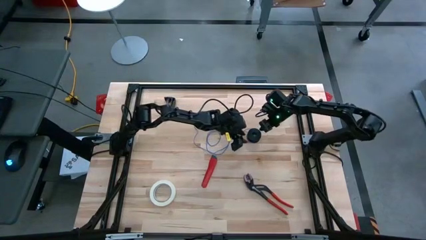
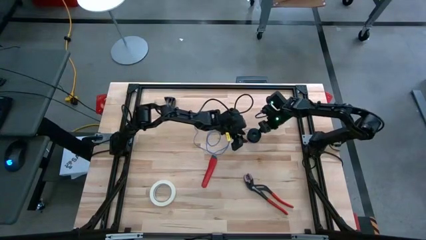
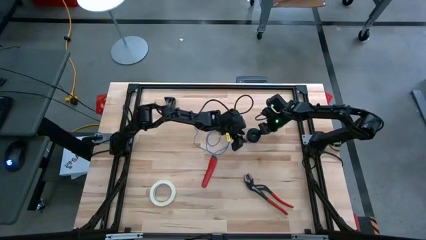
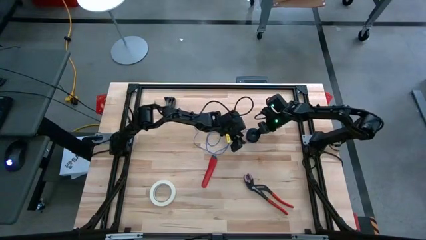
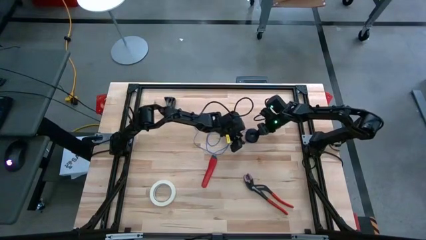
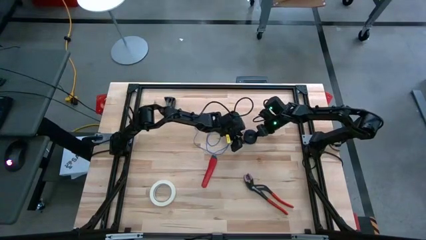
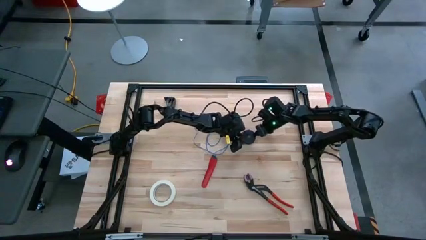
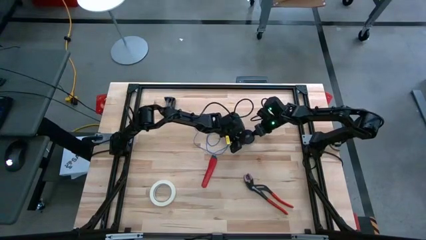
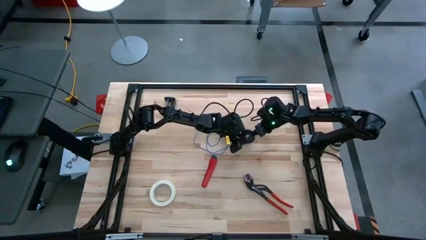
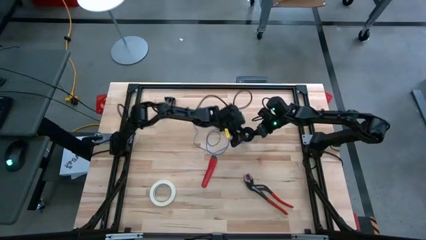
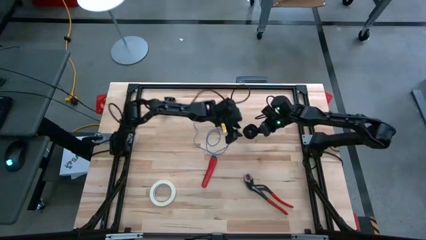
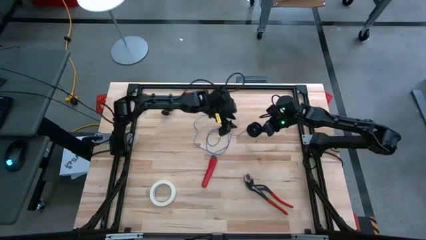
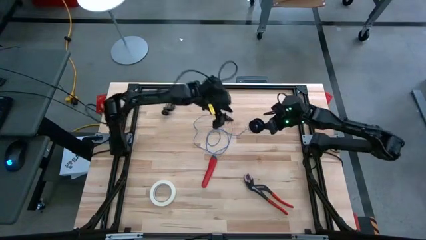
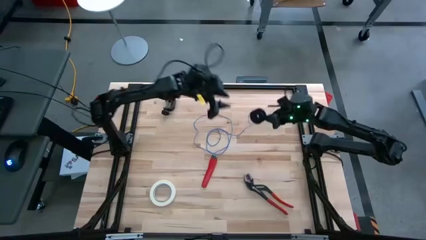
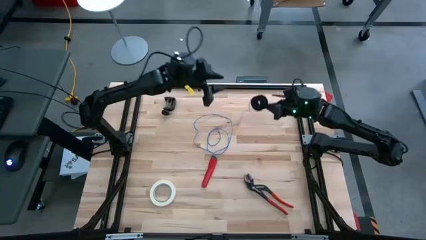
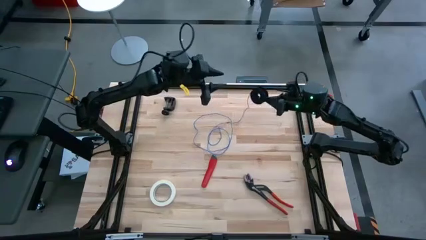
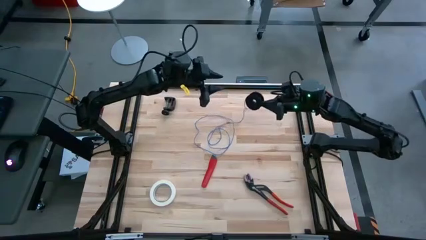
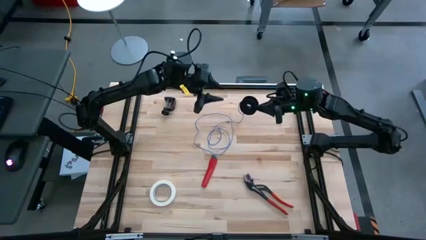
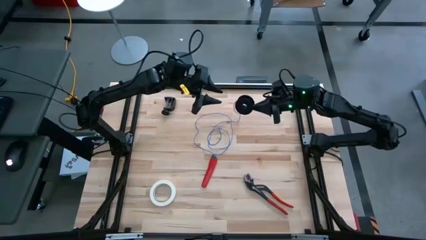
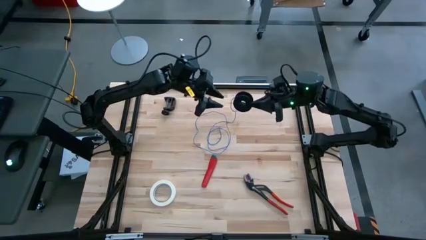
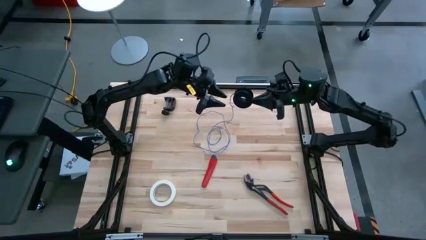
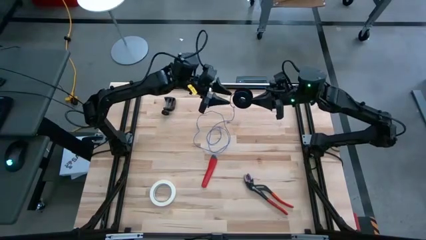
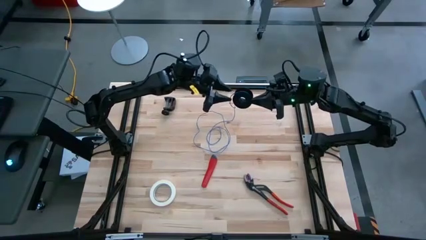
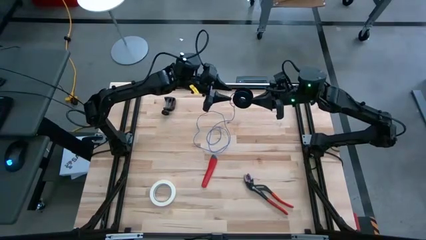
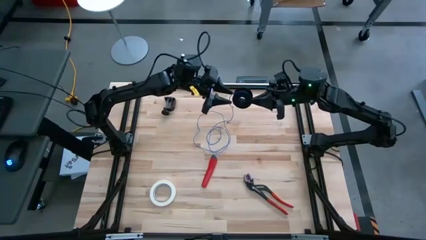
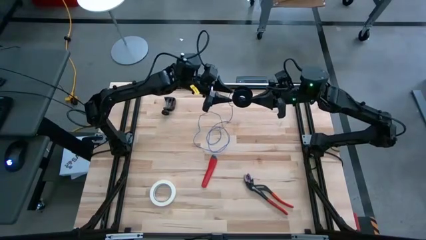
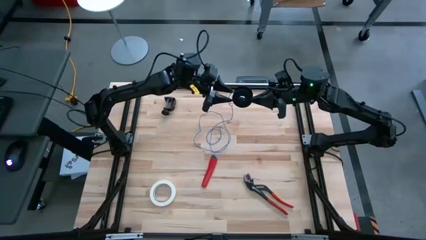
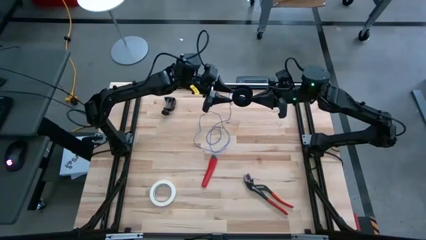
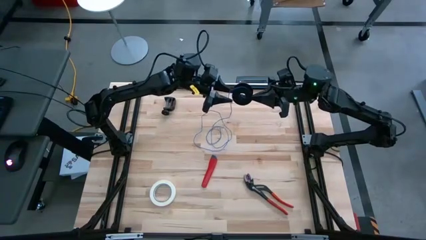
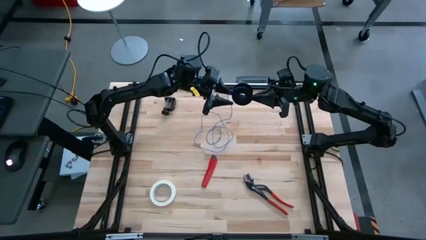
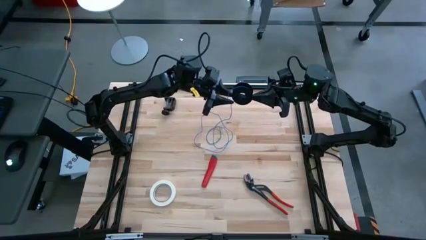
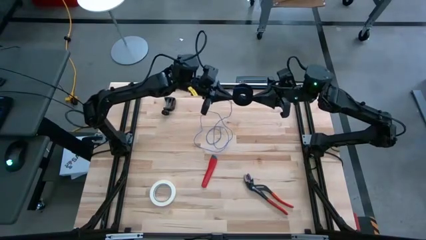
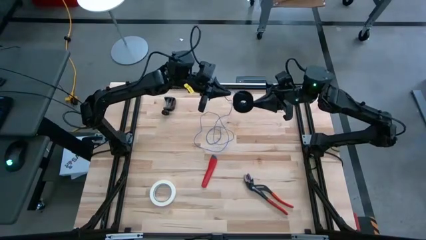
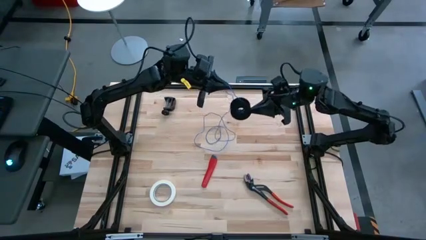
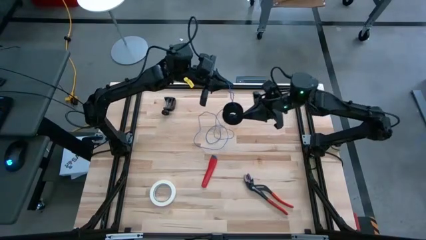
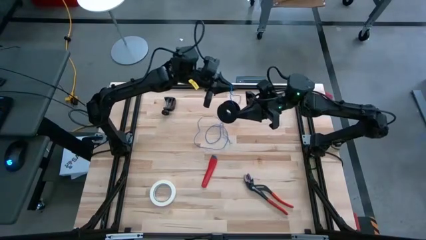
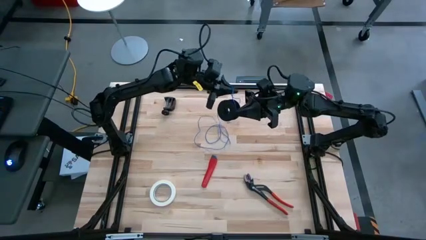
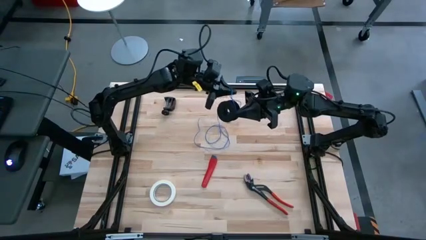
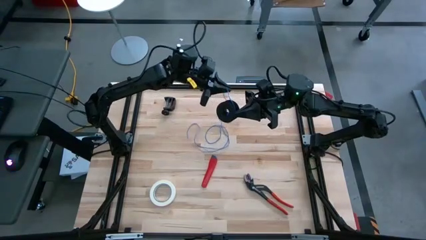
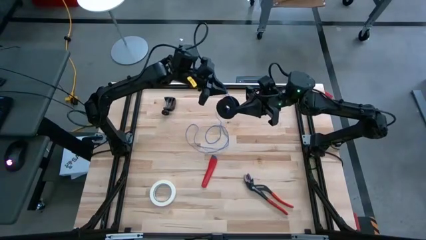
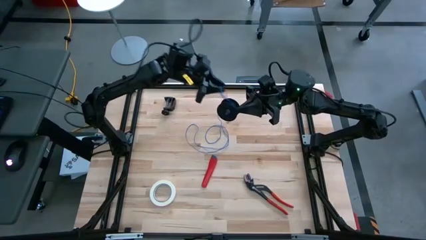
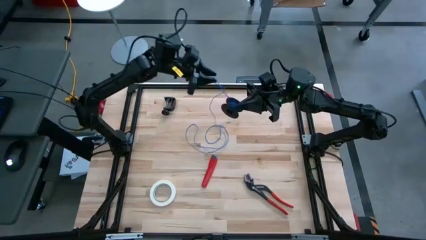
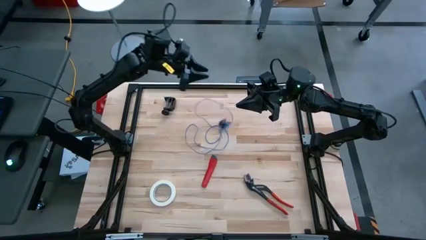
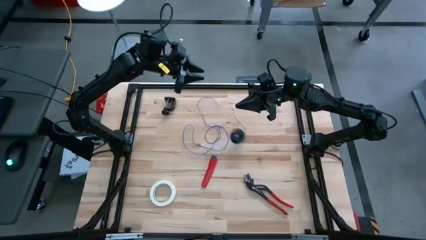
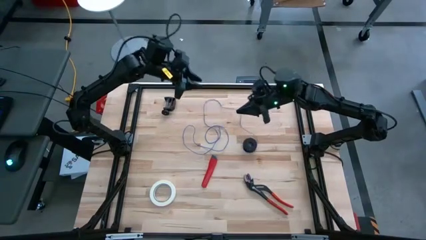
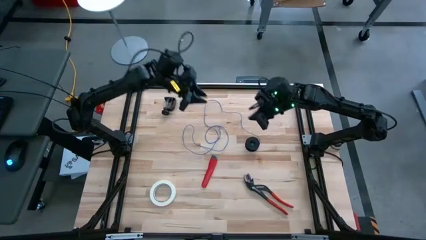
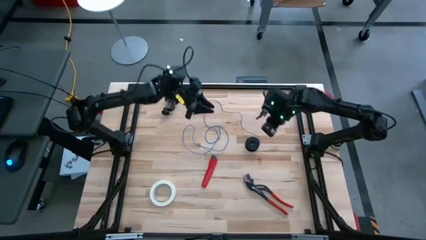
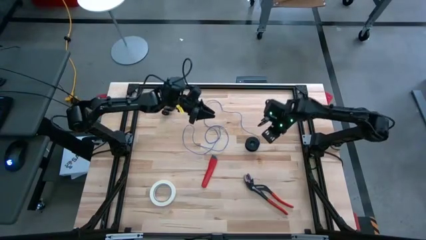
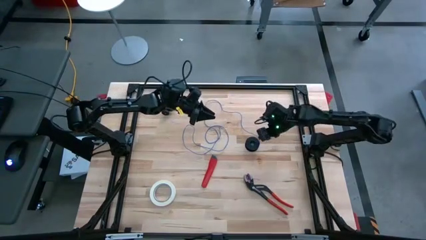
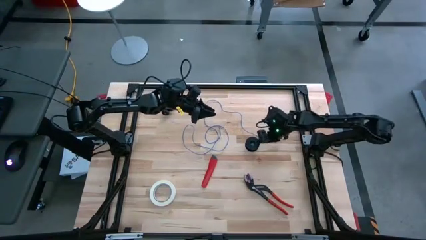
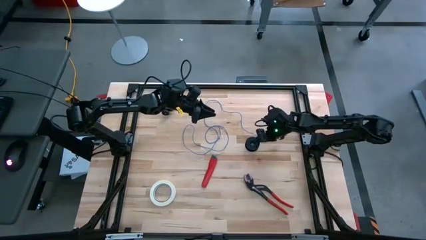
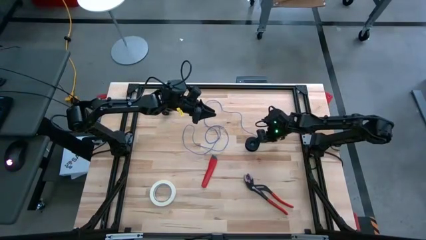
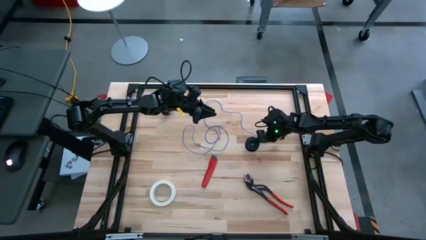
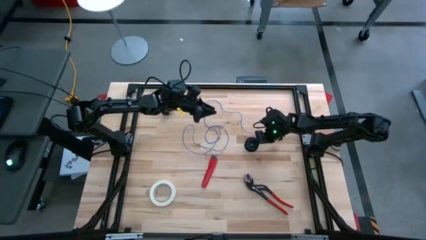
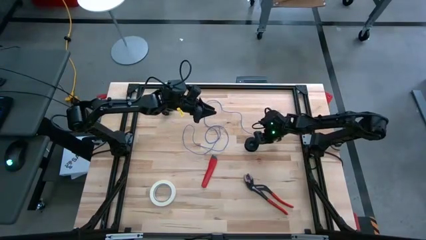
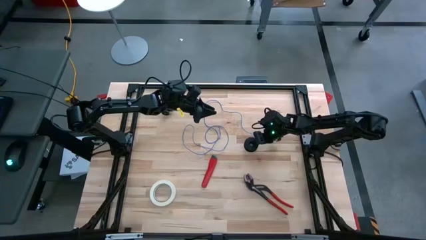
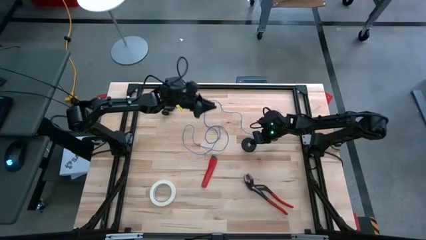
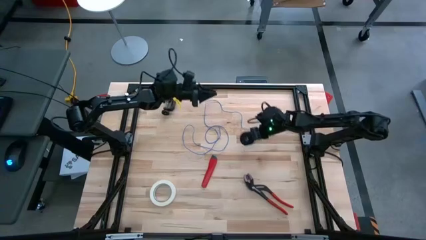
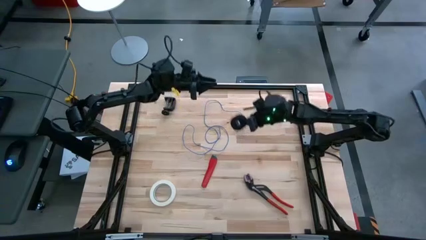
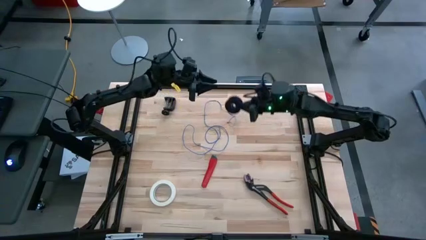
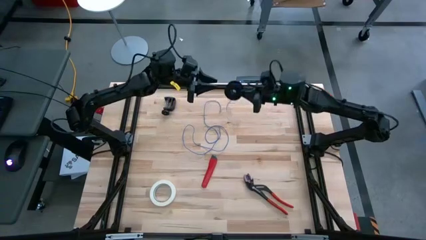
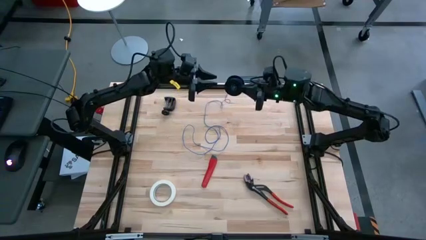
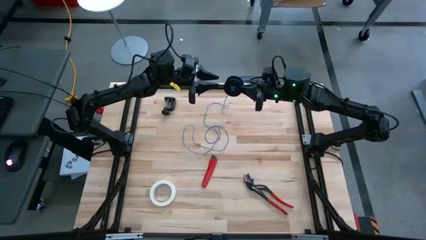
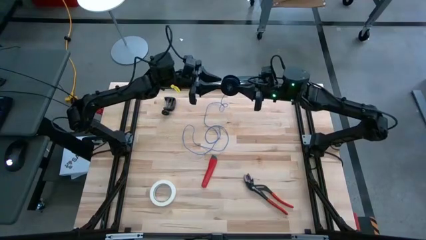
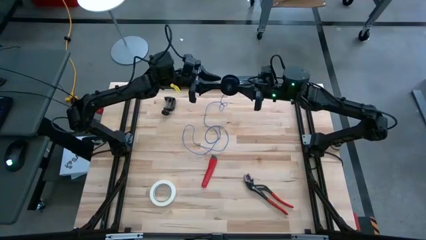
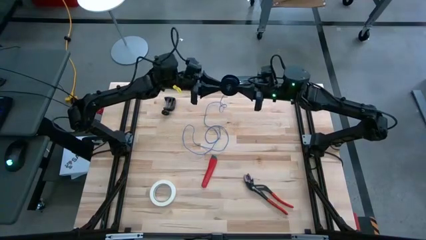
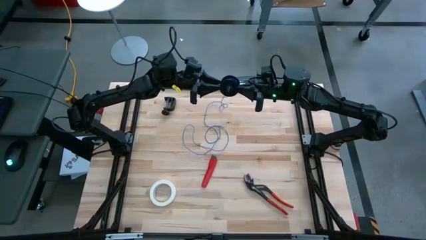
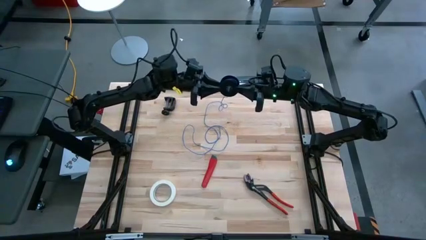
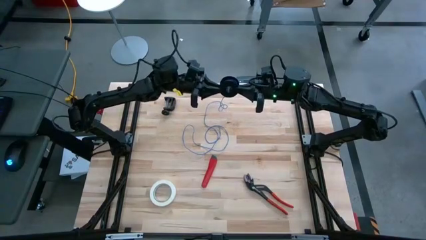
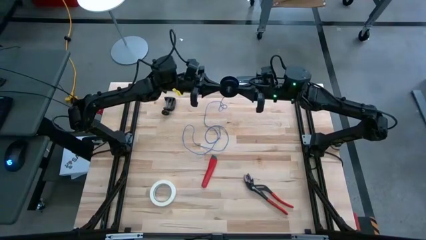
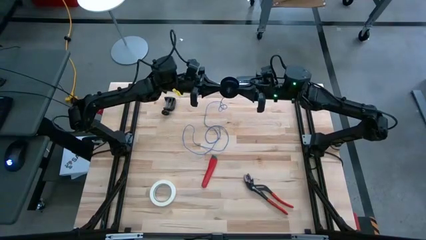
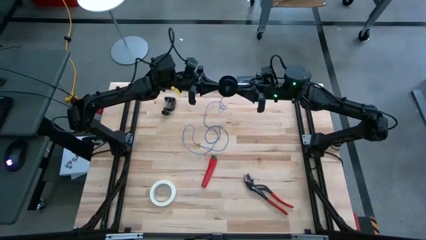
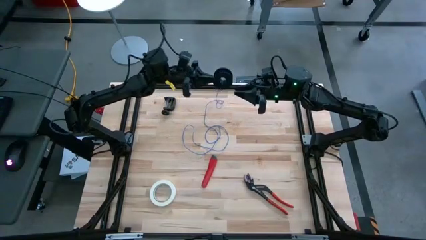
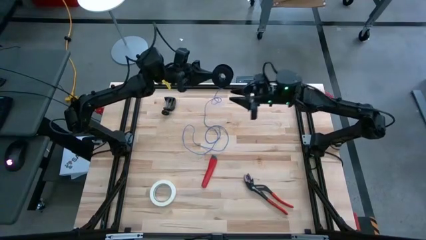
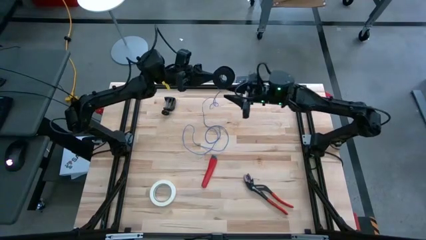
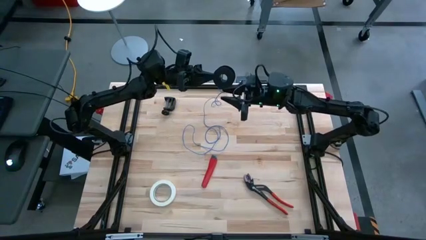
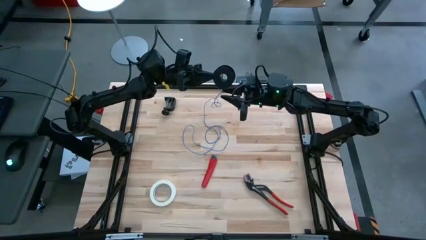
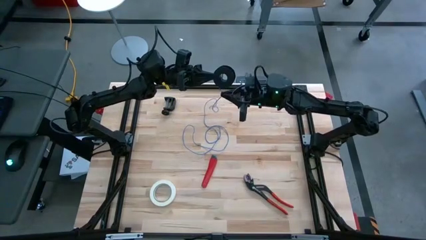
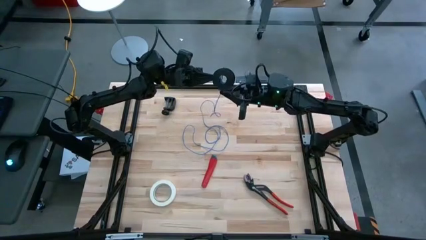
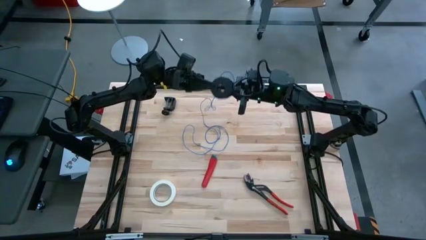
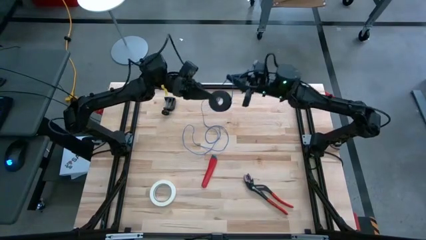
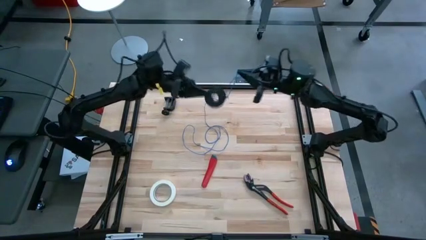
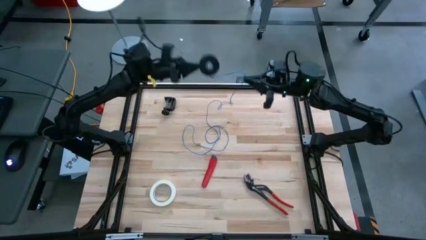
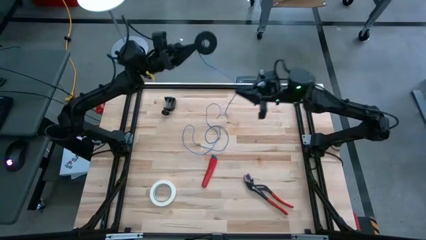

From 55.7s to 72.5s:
Task: Coil cords
Uncoil the blue wire cable from the black spool
